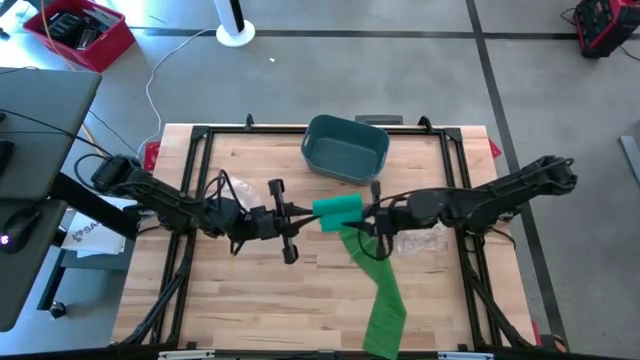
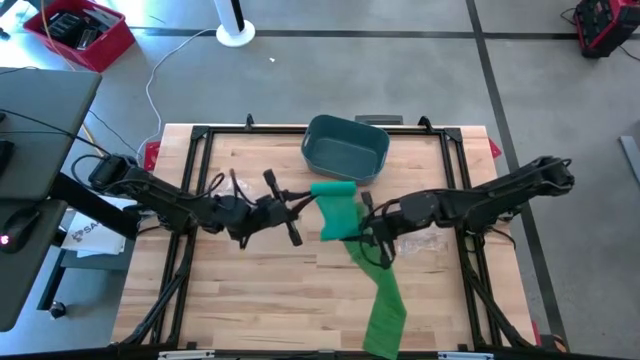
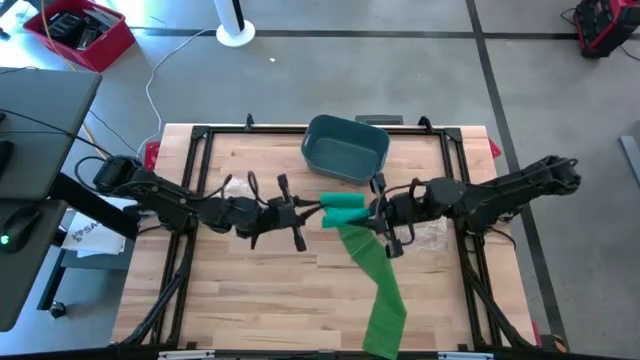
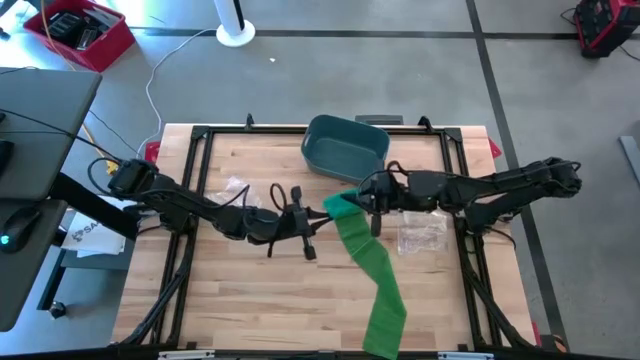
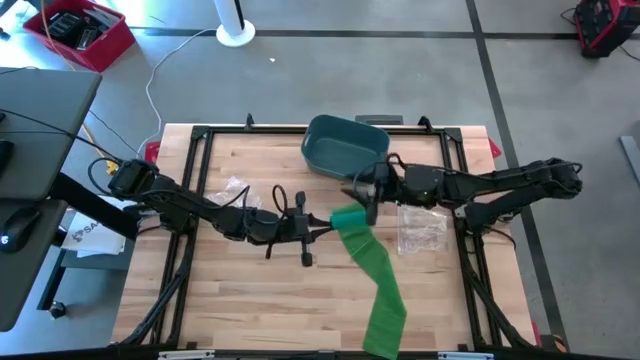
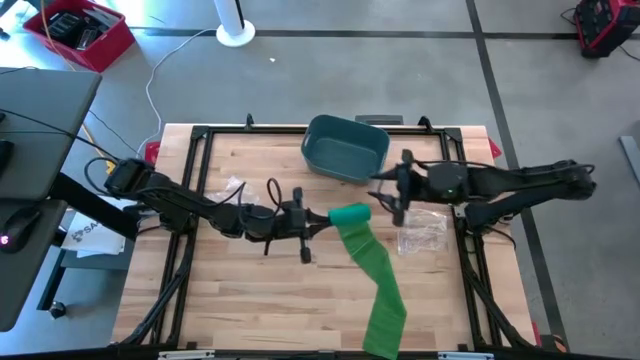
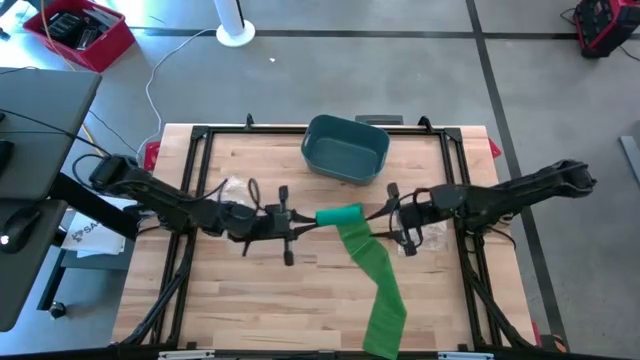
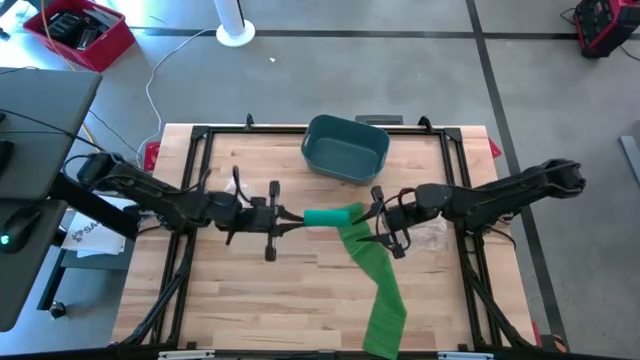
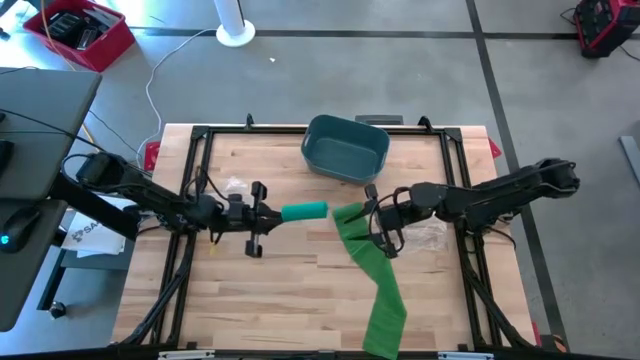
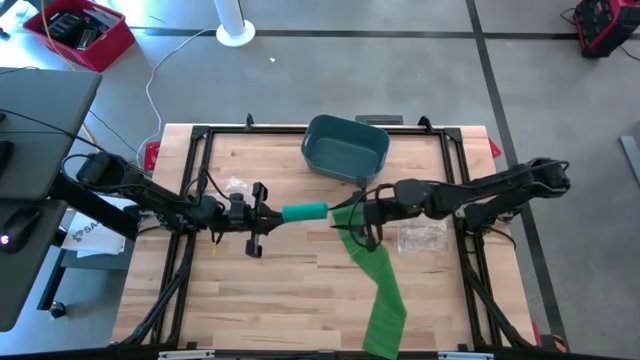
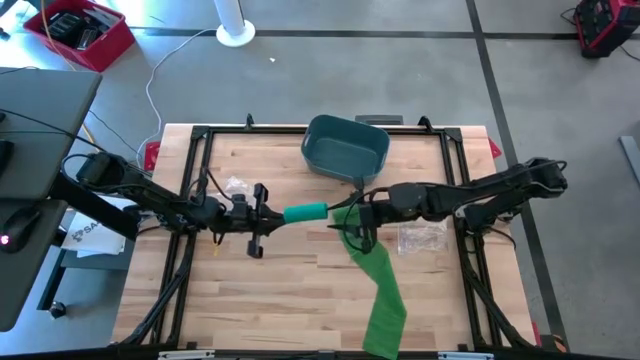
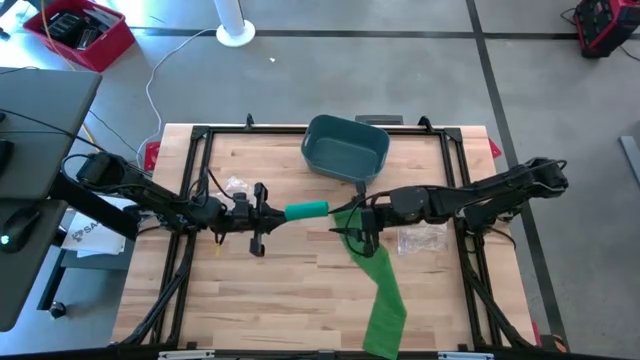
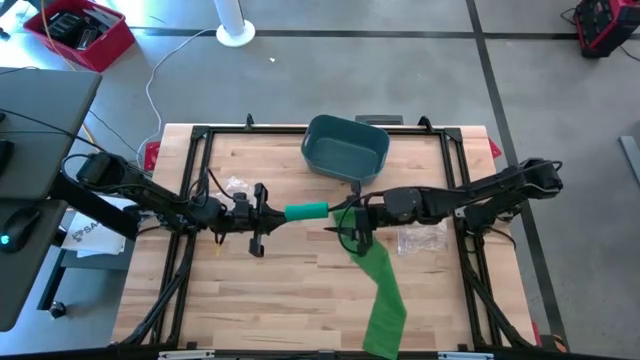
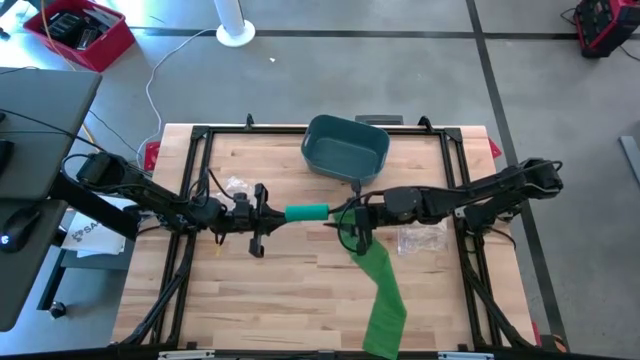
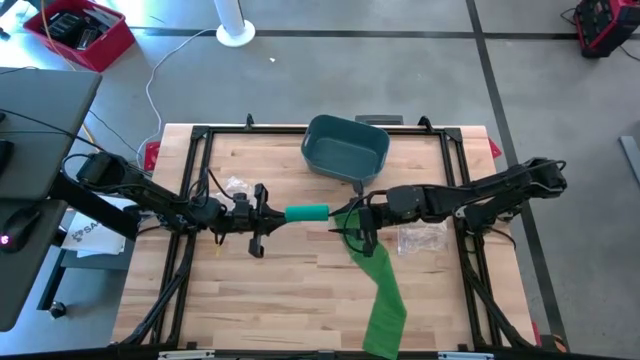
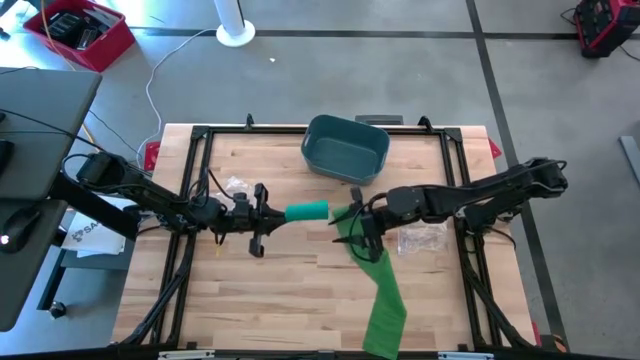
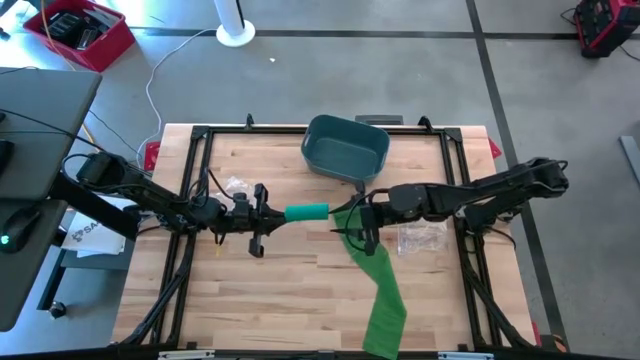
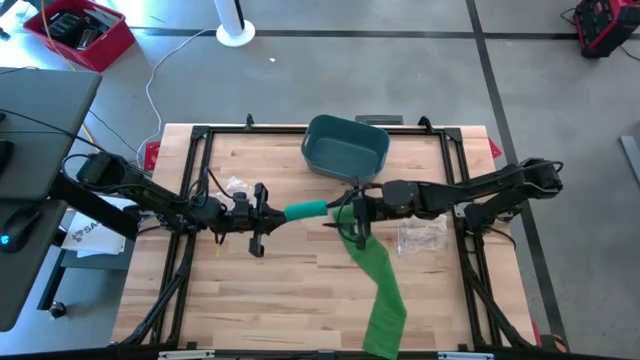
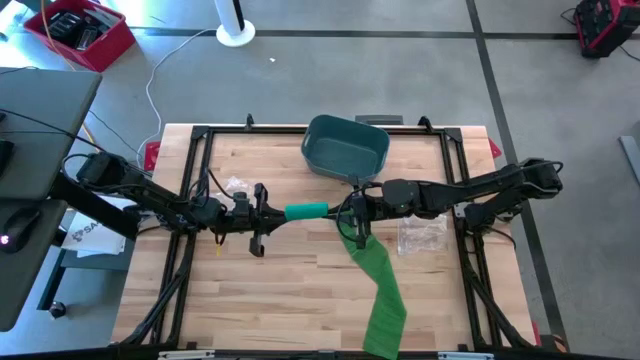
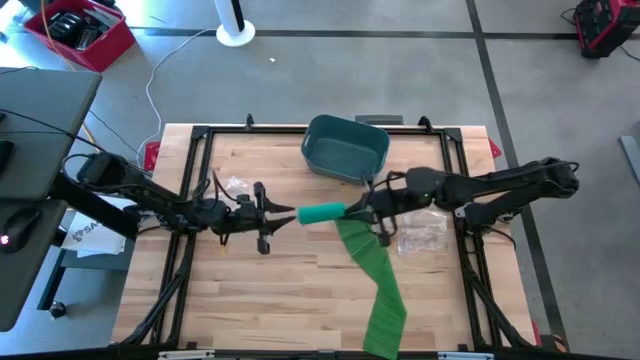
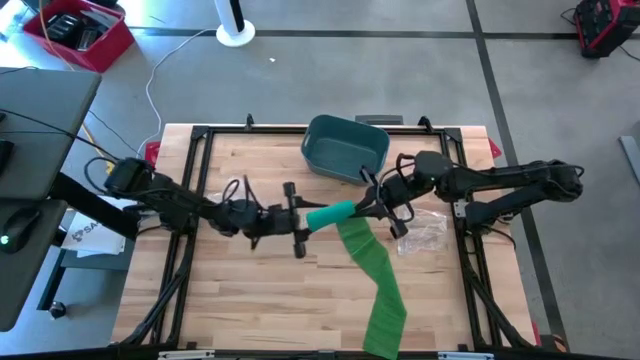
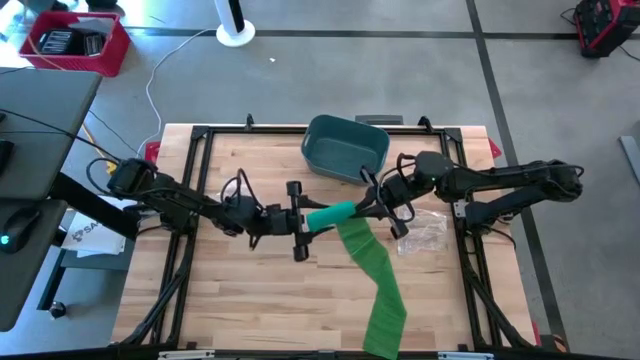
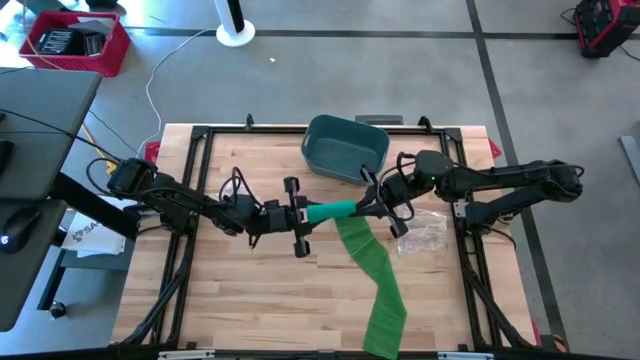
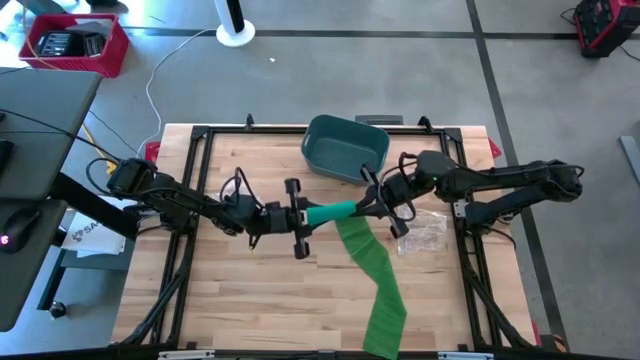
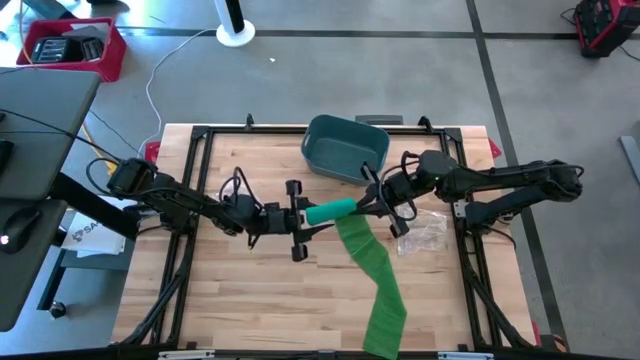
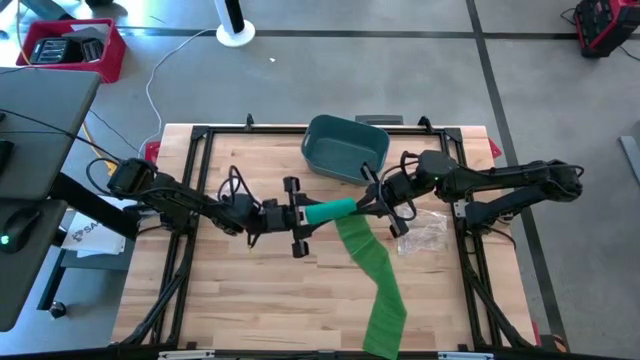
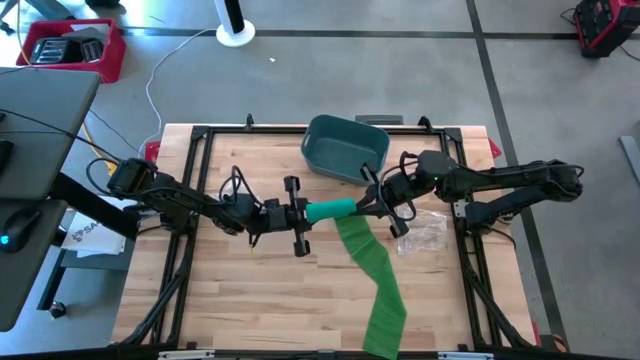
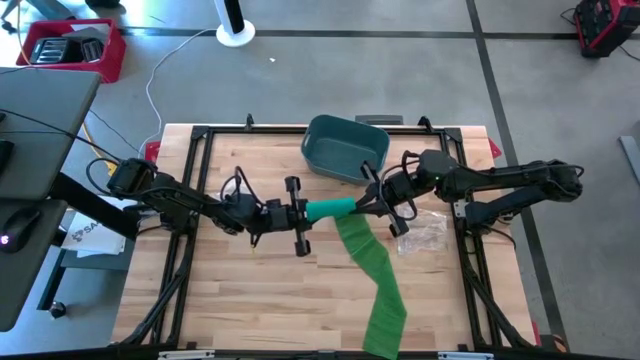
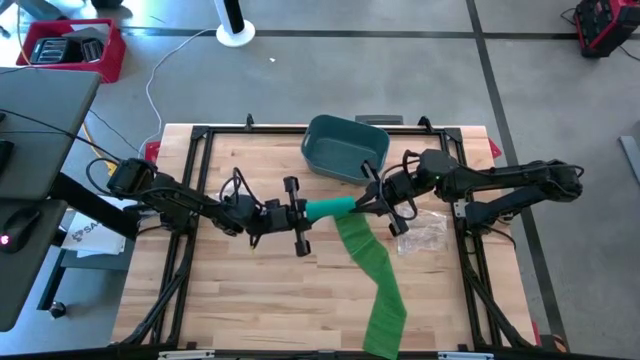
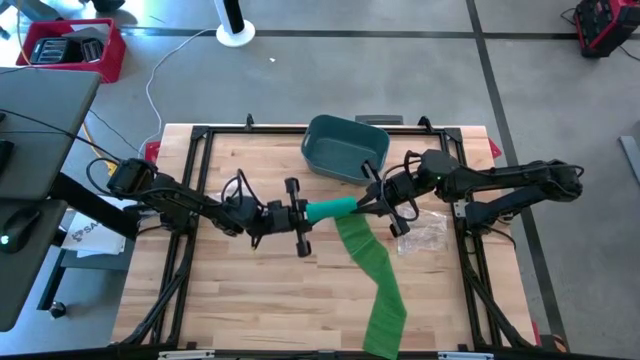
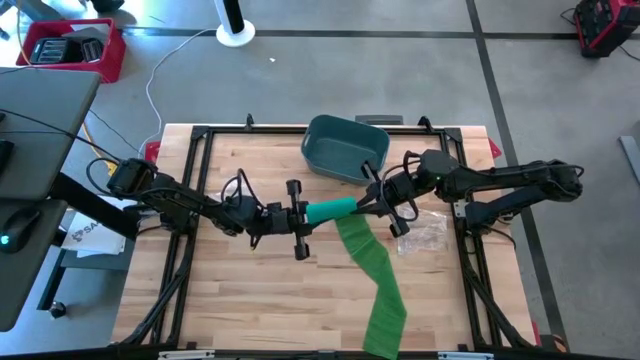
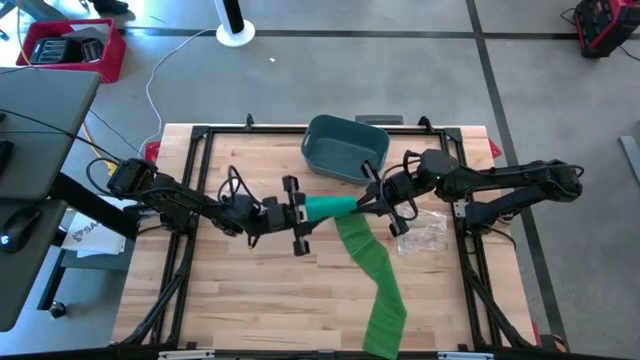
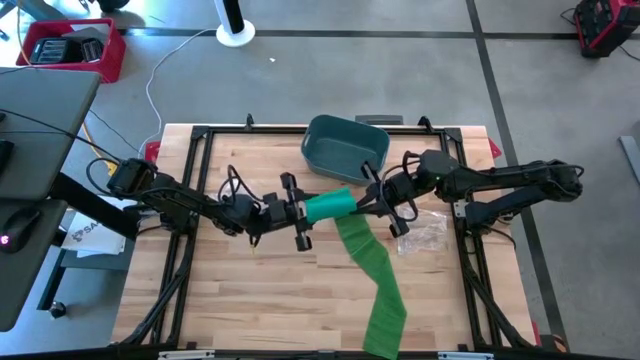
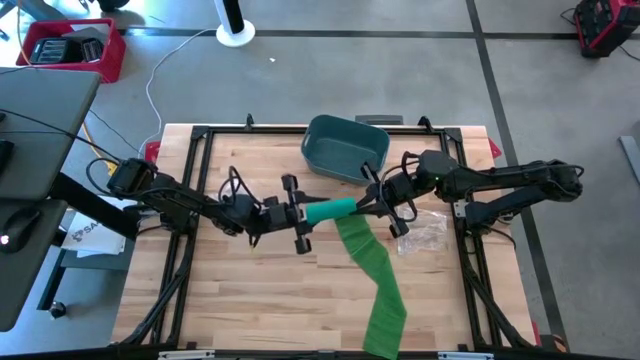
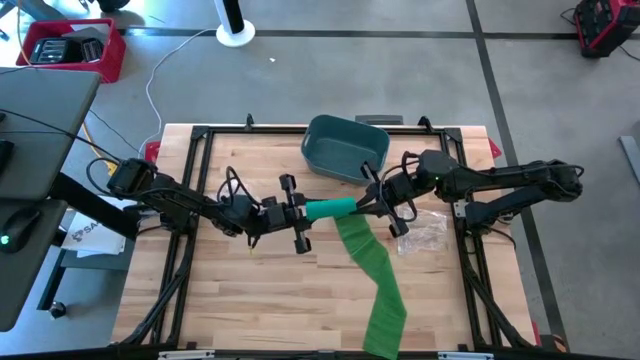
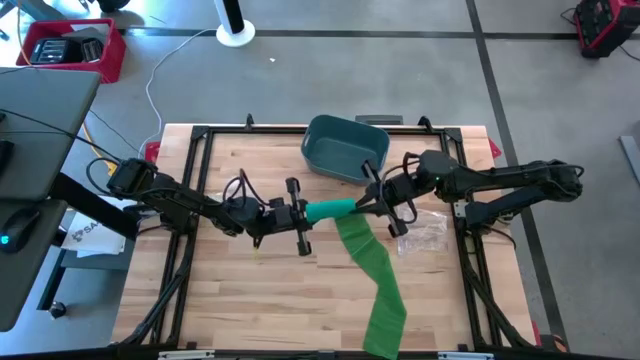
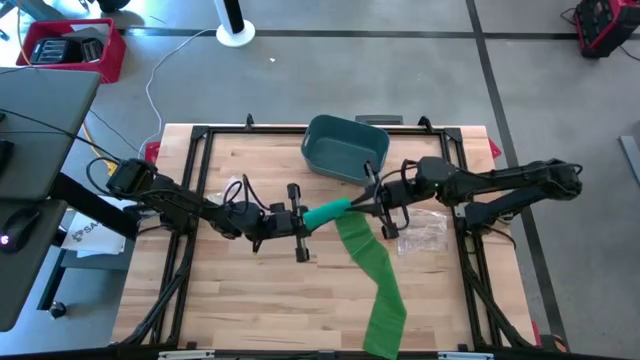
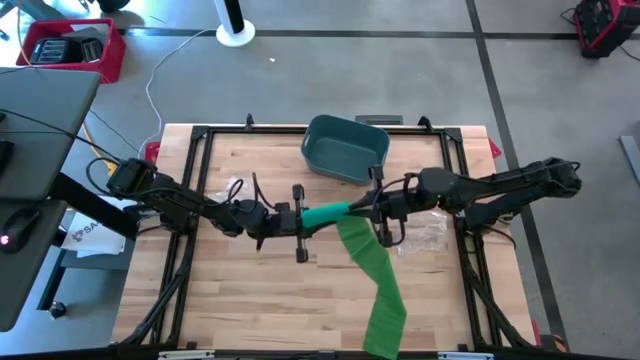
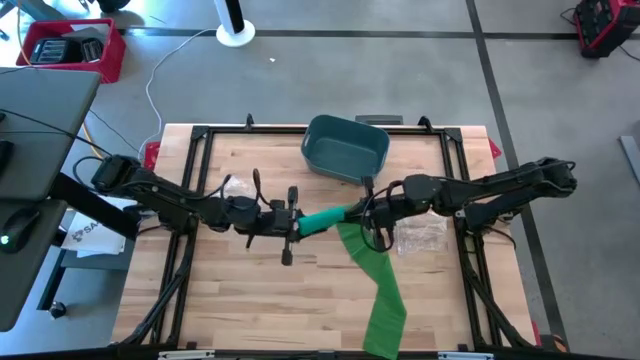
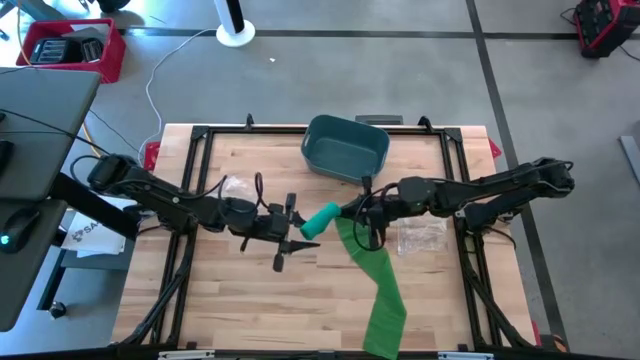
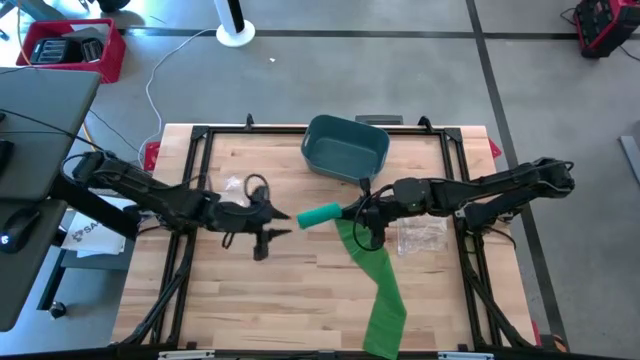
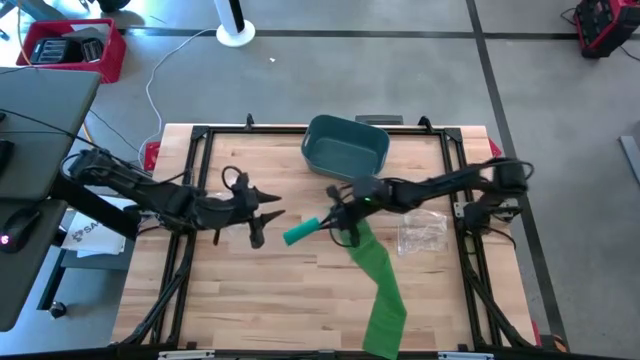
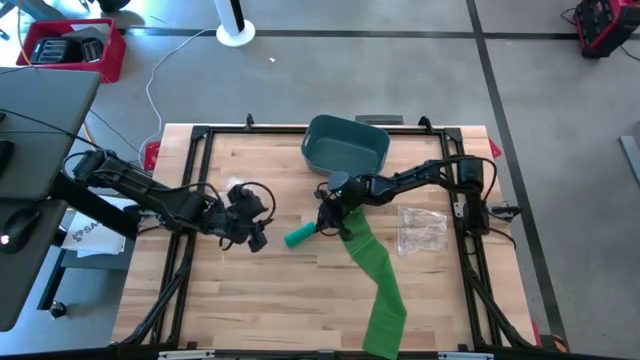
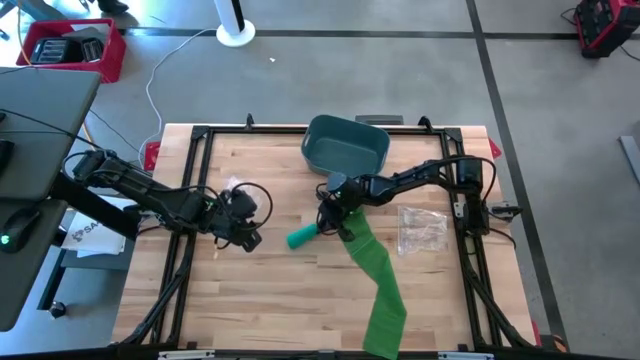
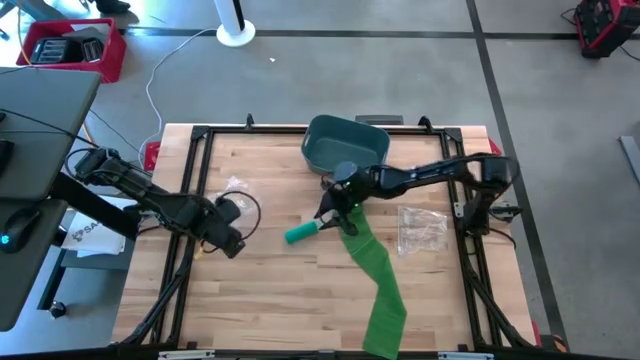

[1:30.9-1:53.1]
Task: Roll bandage
Roll the light green bandage

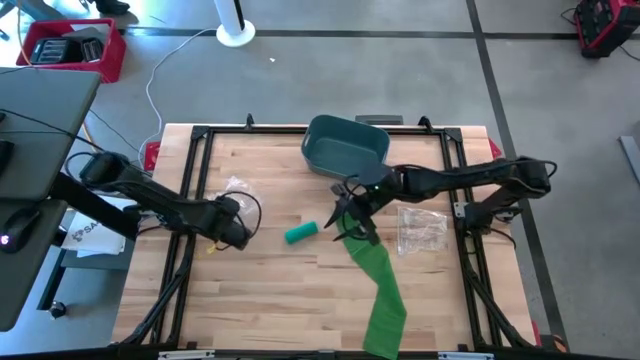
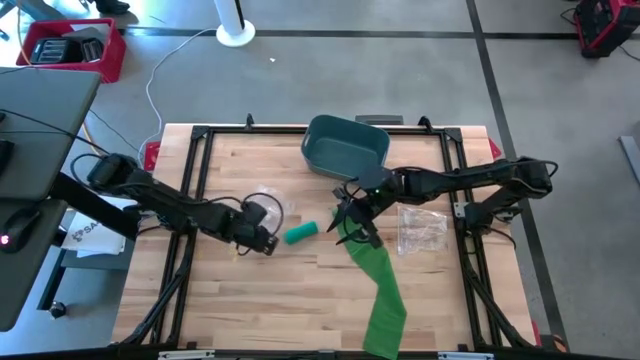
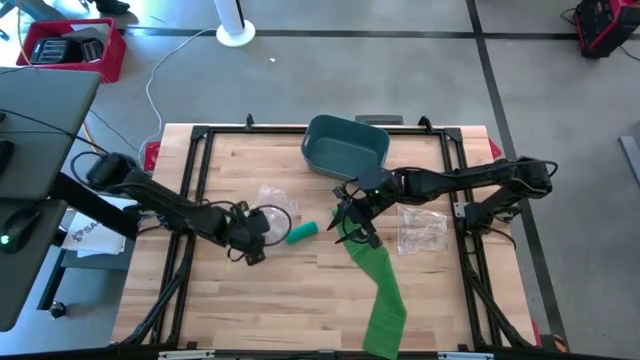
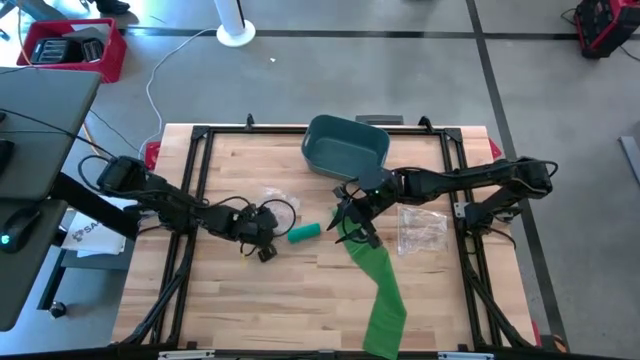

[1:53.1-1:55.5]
Open the left transparent zip bag
